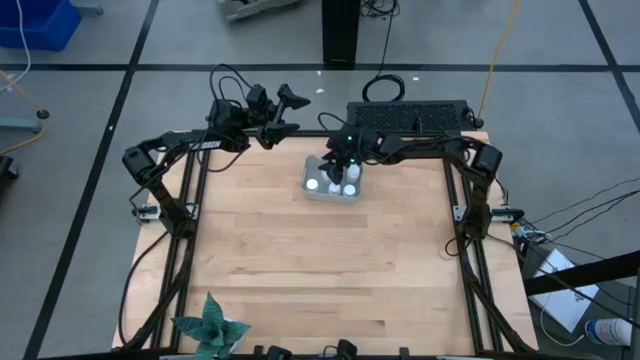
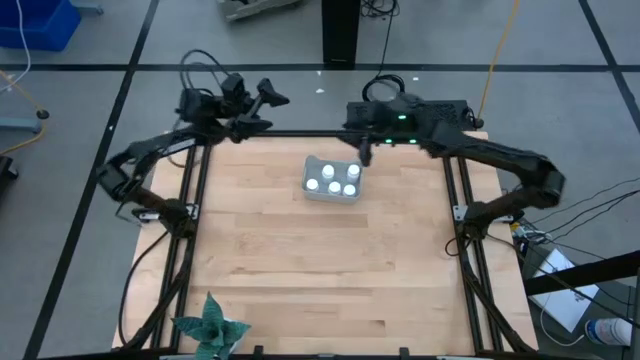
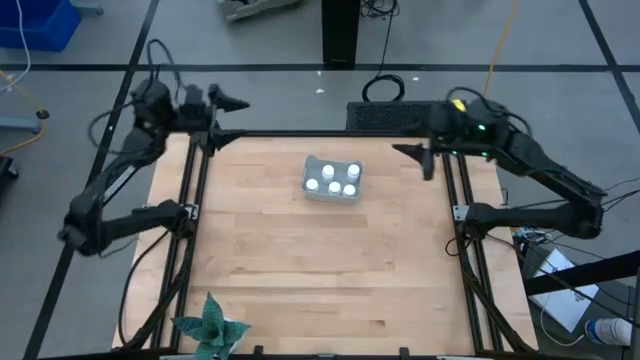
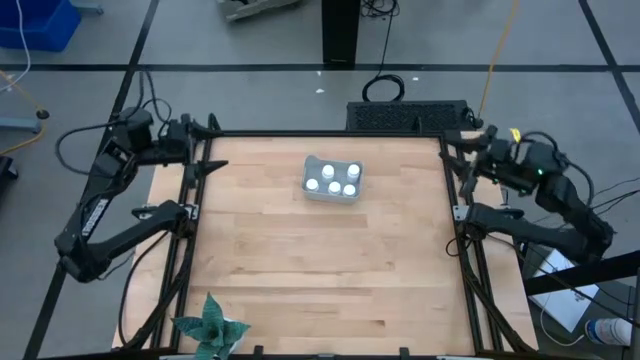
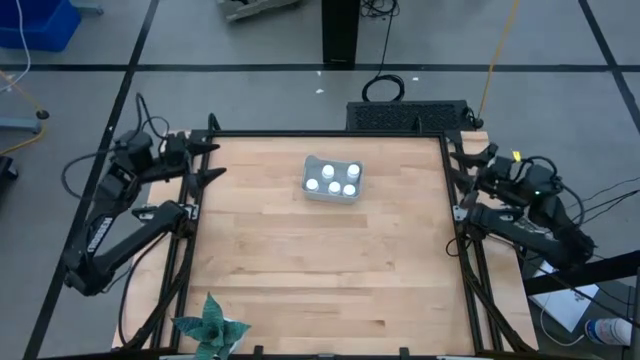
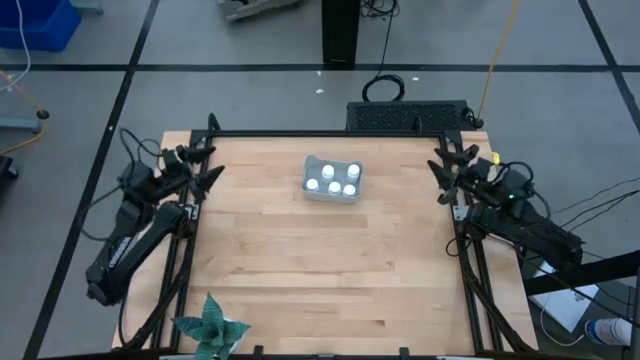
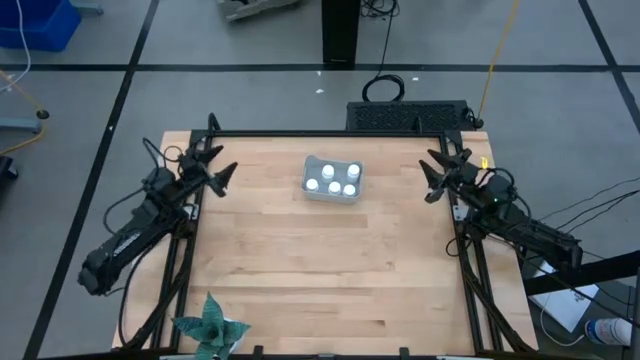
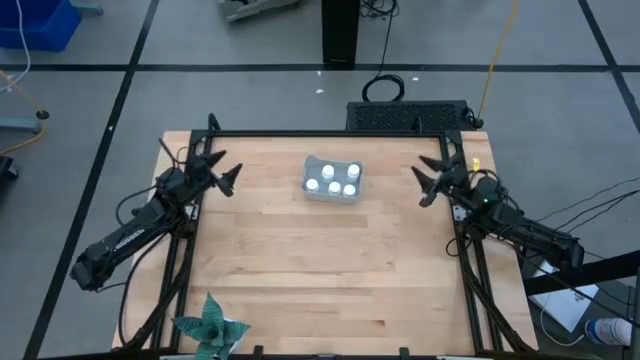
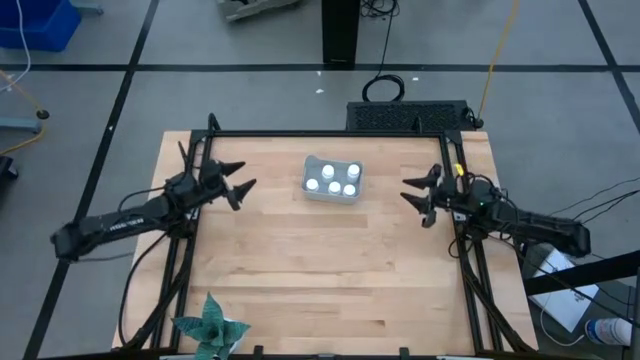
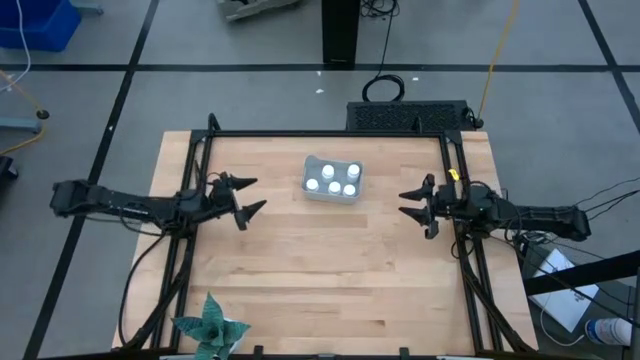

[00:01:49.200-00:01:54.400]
Task: Pick and place pill bottles into a basket
Return to Home Position

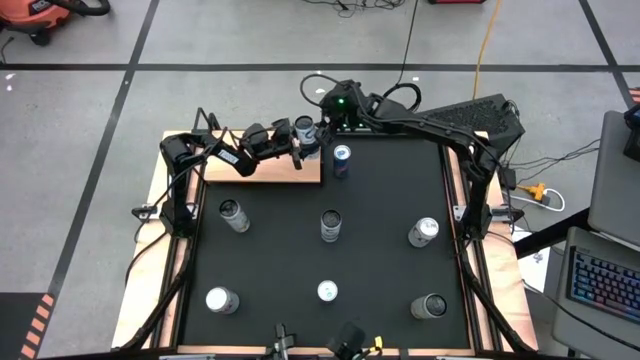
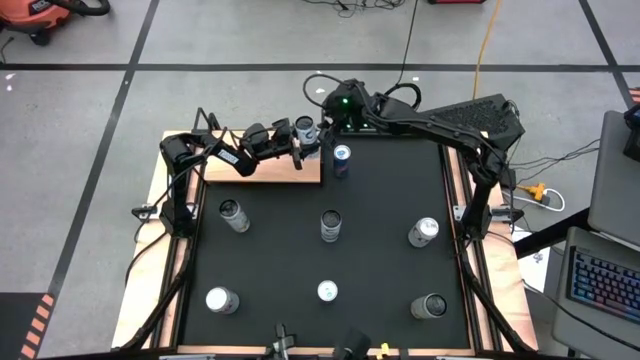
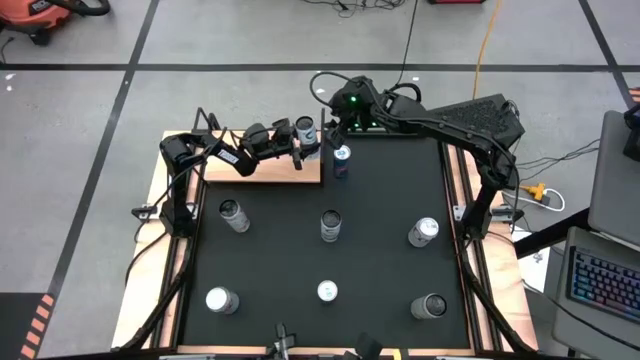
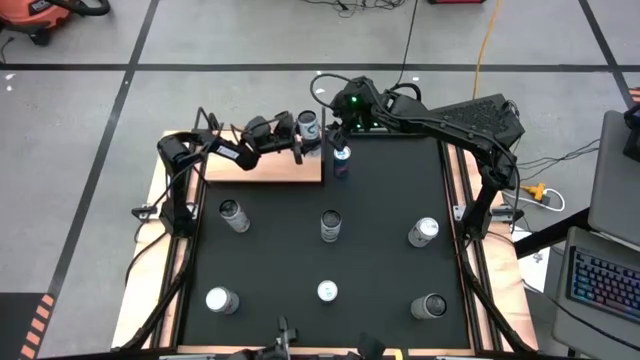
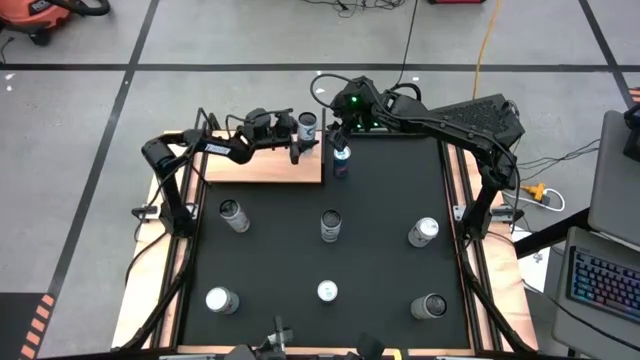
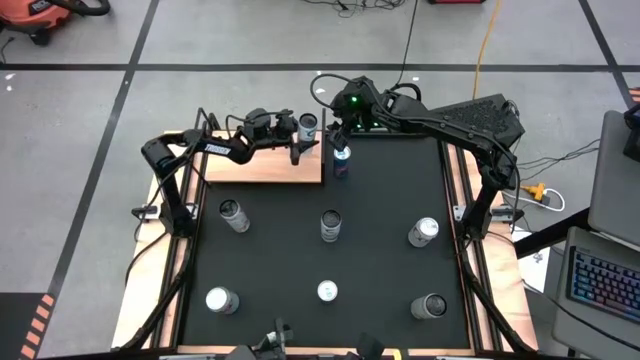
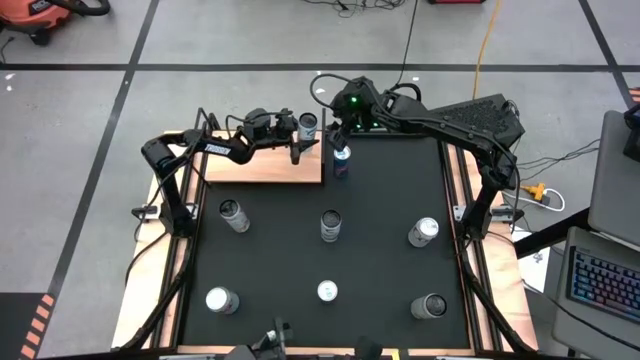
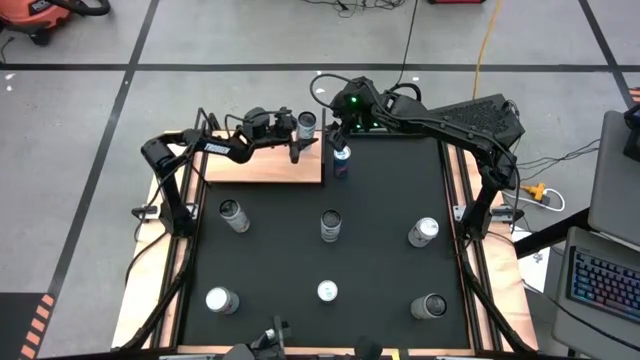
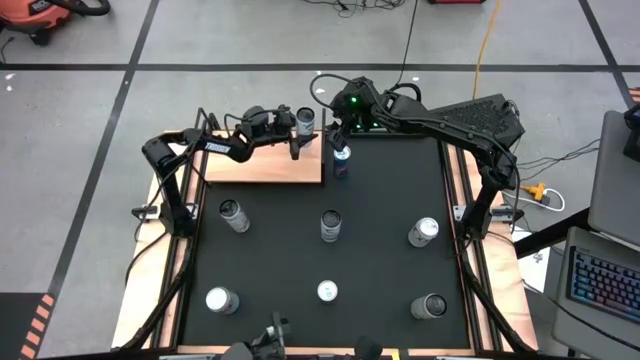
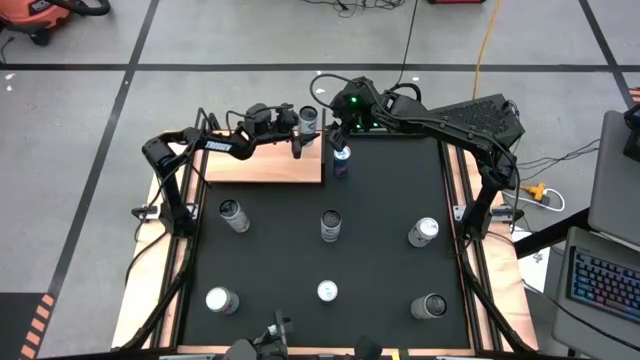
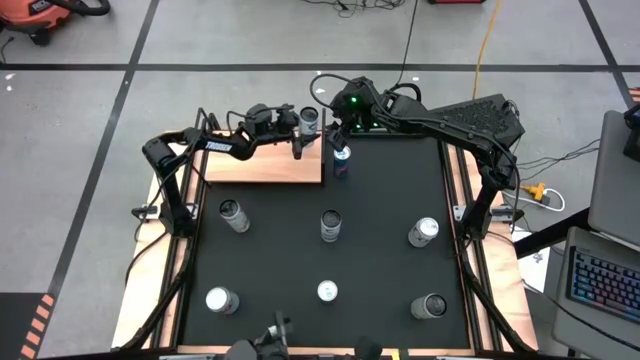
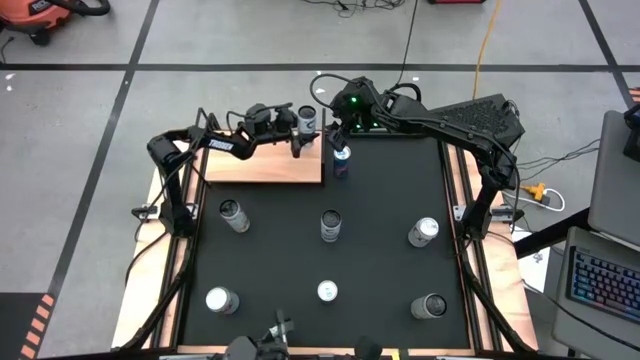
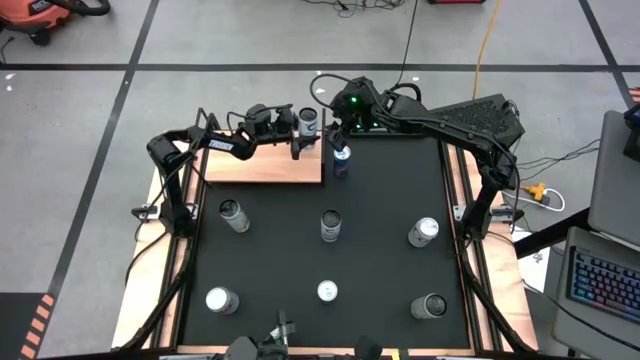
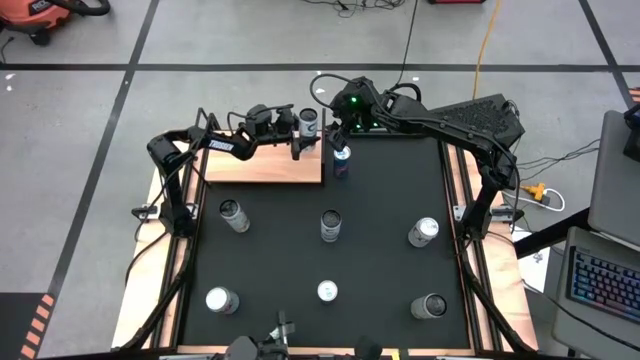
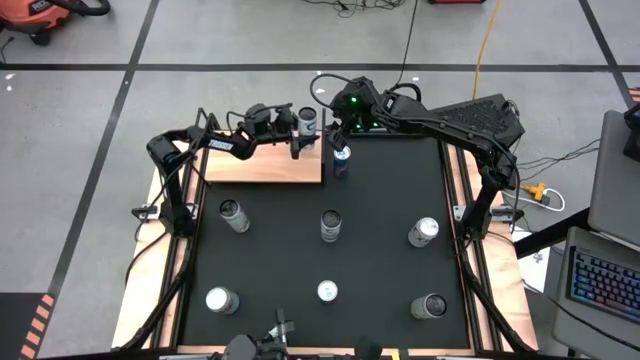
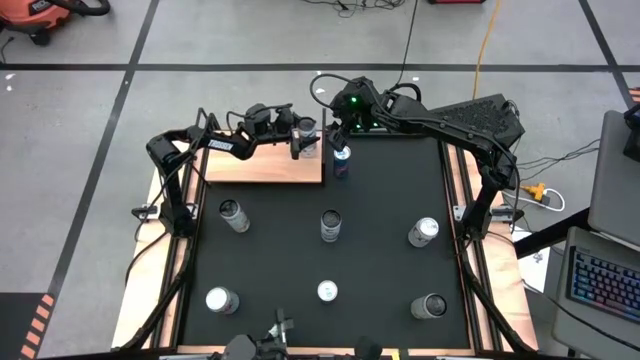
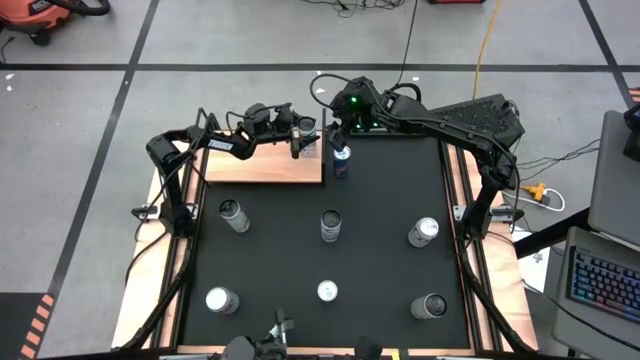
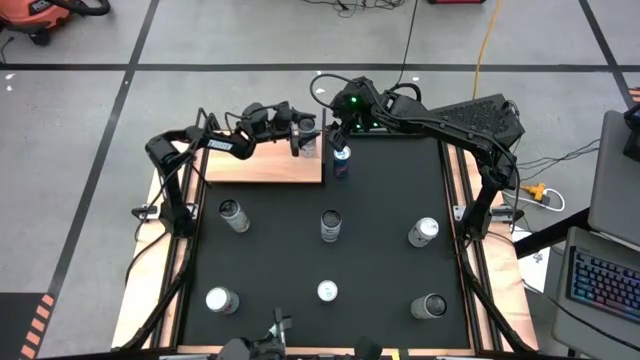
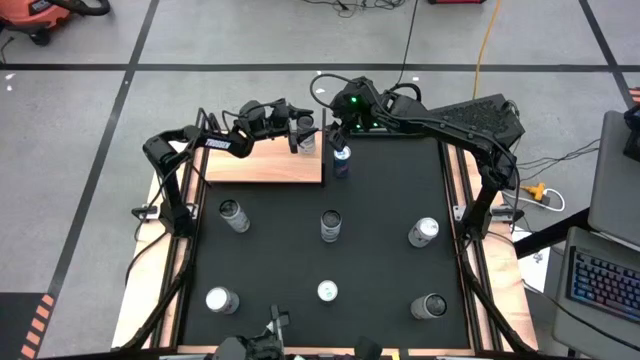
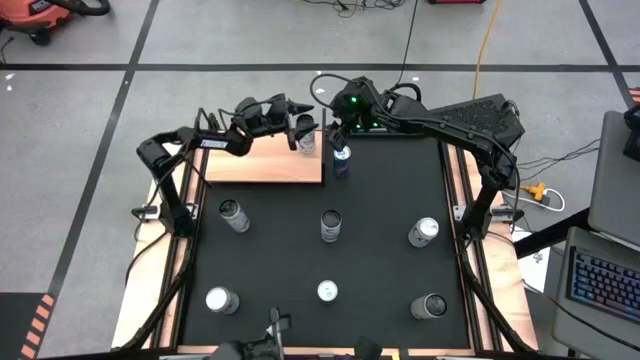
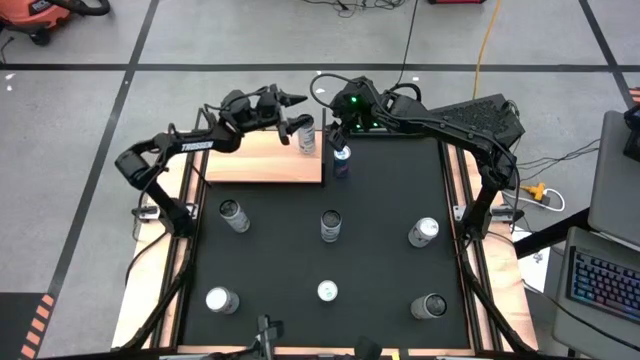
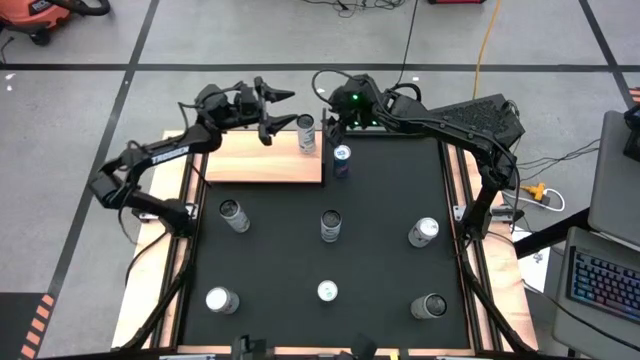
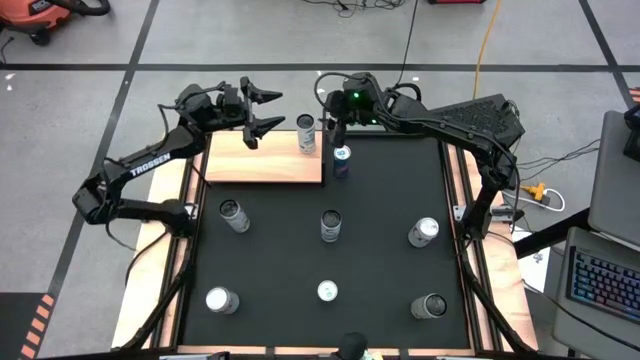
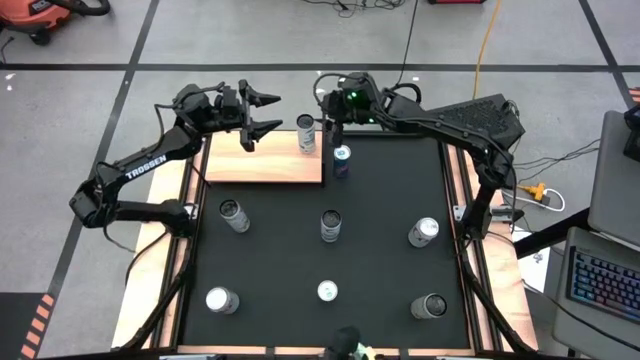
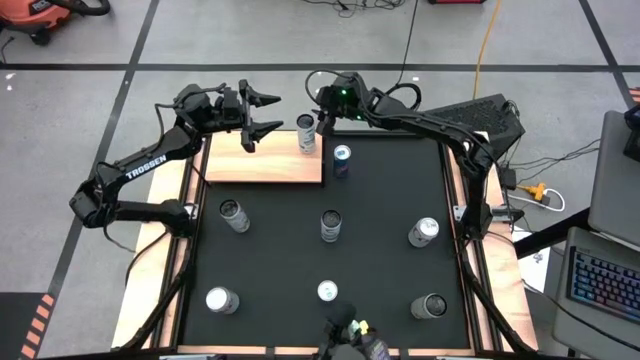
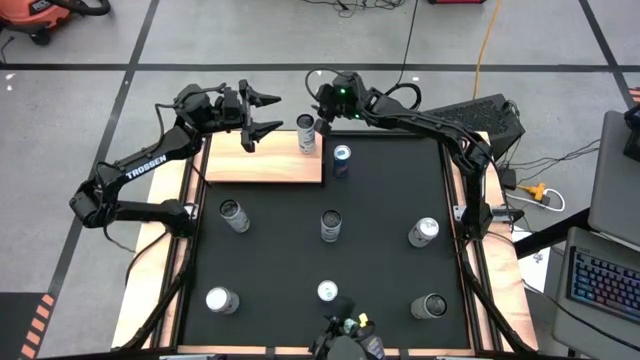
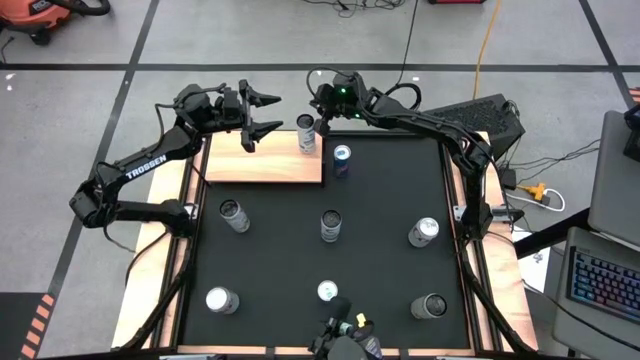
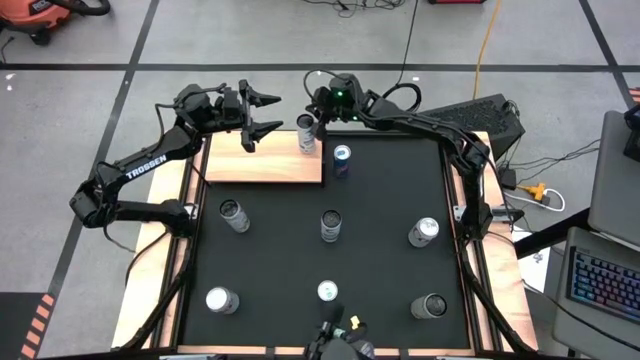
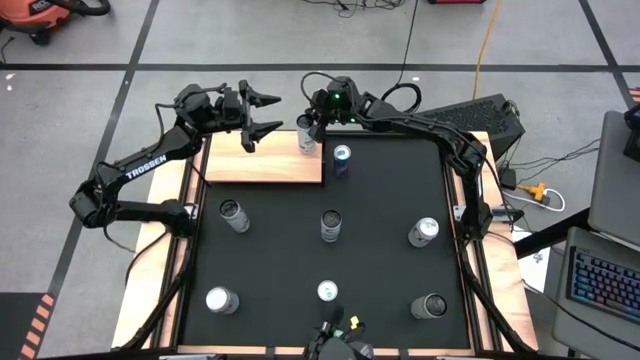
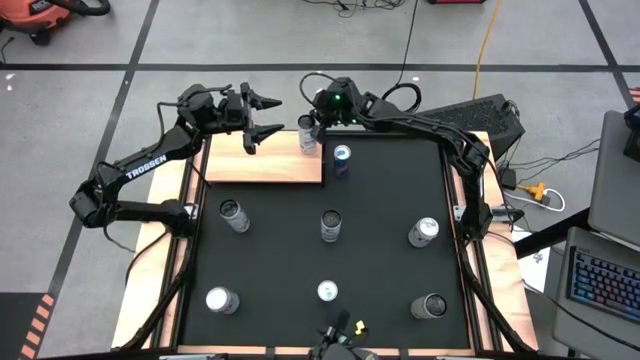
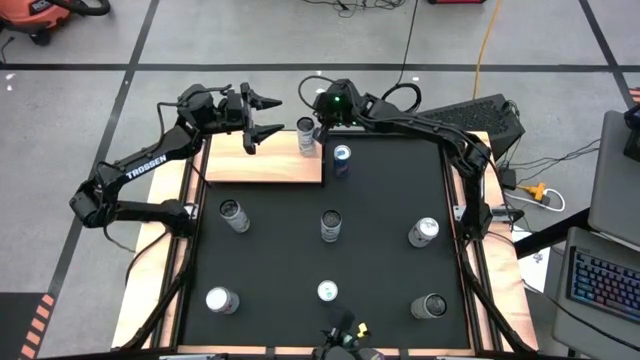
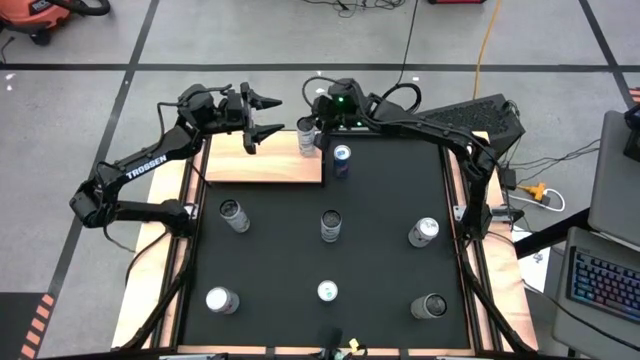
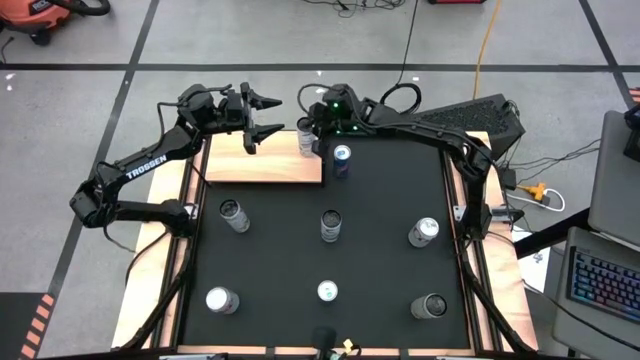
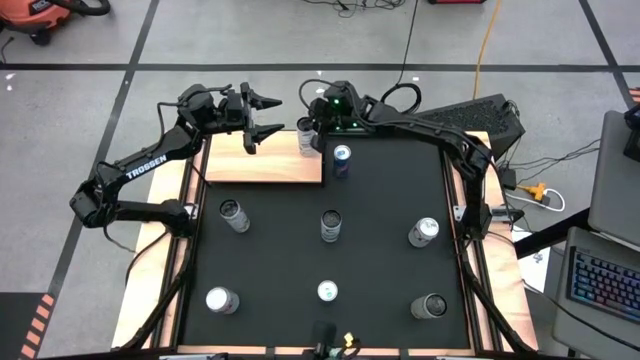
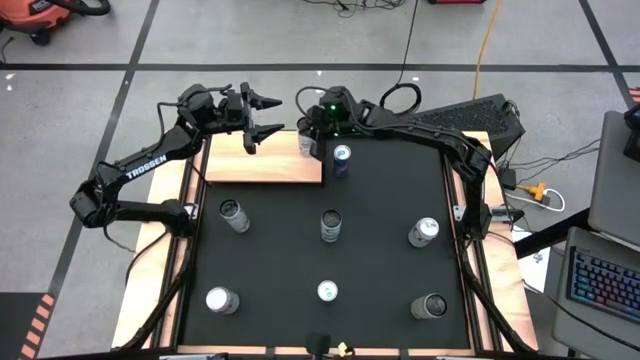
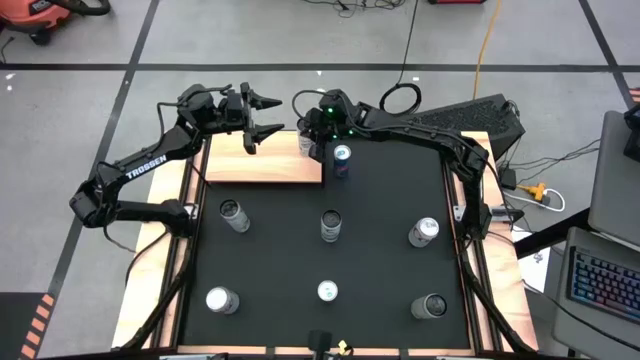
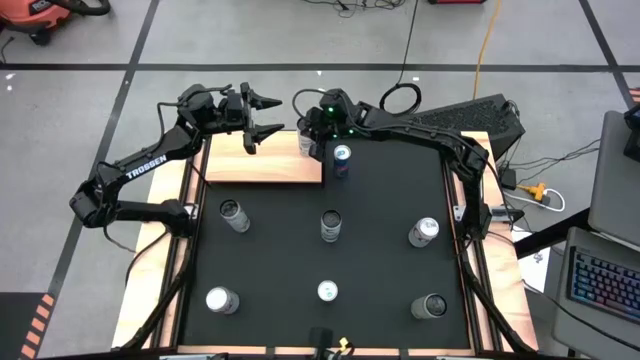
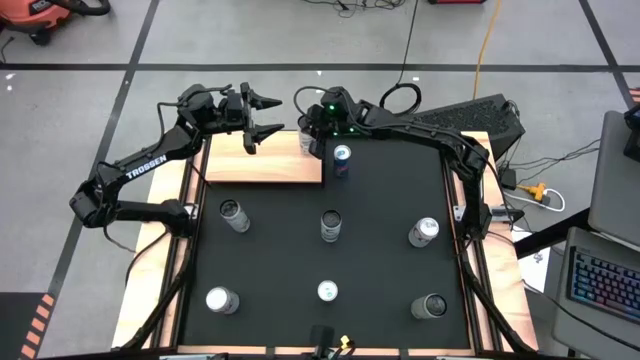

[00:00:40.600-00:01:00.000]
Task: Place canned beverage on shelf
Put the top white-blue soda can on the shelf
